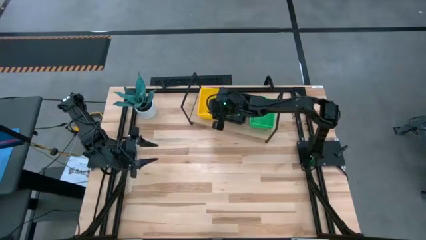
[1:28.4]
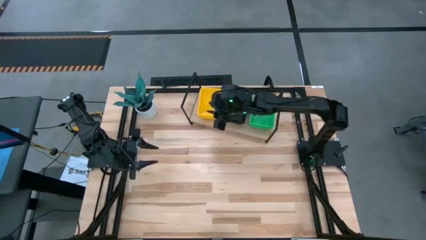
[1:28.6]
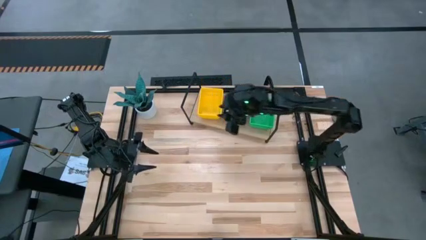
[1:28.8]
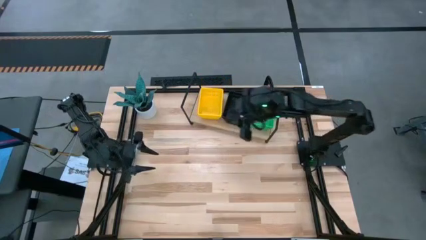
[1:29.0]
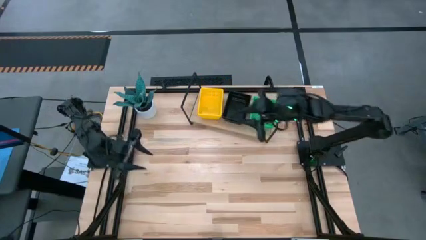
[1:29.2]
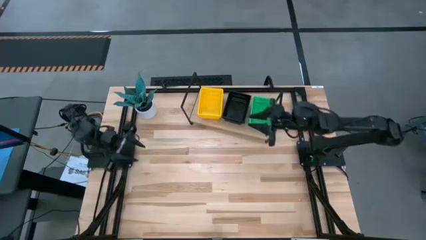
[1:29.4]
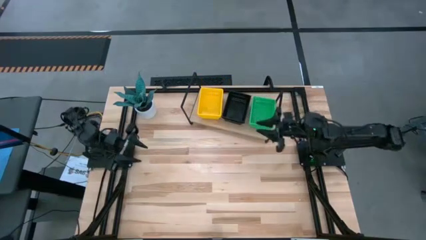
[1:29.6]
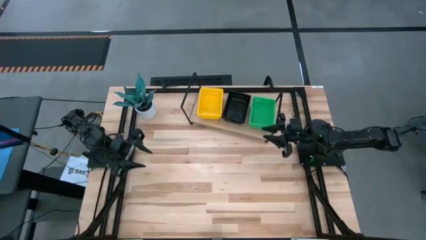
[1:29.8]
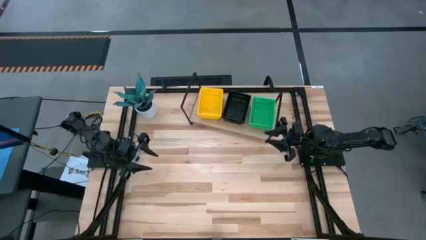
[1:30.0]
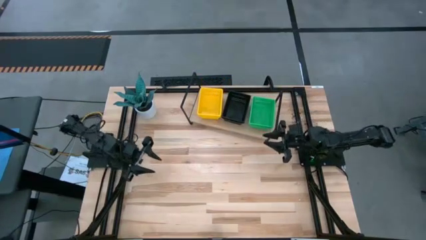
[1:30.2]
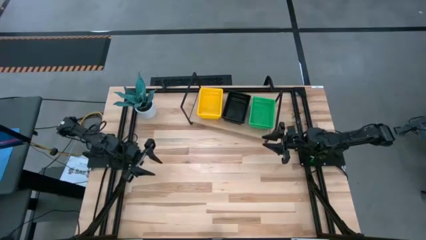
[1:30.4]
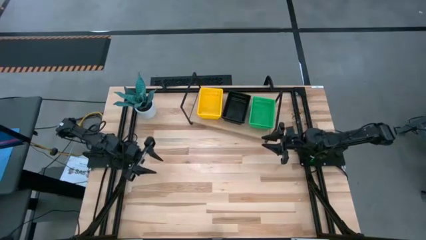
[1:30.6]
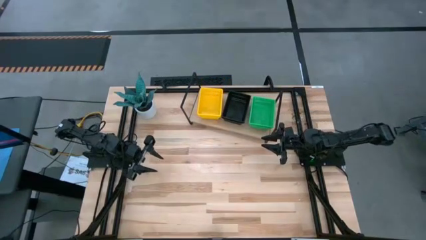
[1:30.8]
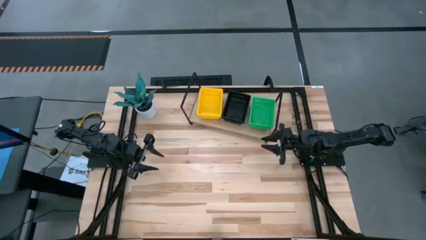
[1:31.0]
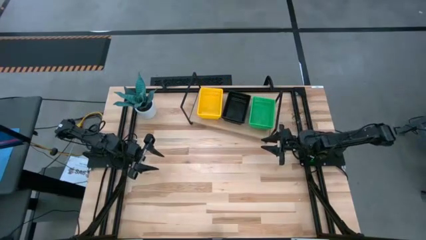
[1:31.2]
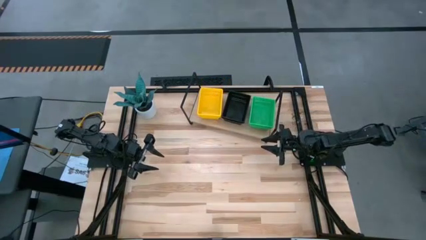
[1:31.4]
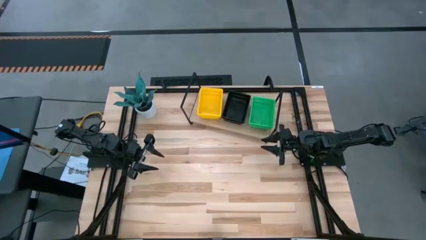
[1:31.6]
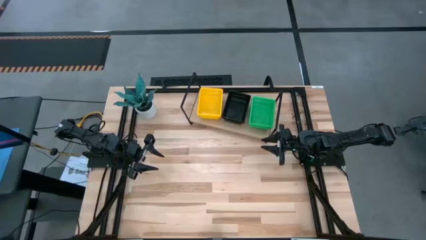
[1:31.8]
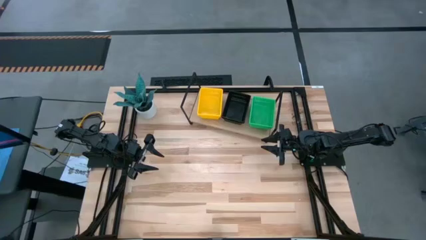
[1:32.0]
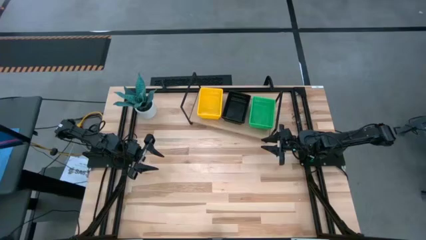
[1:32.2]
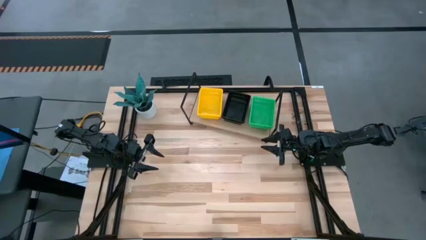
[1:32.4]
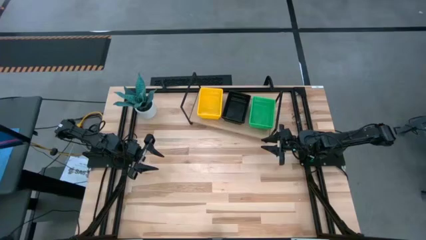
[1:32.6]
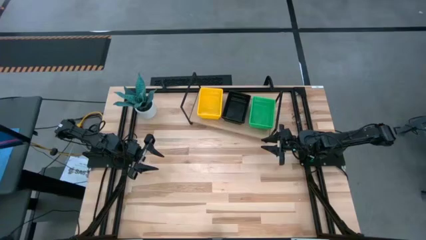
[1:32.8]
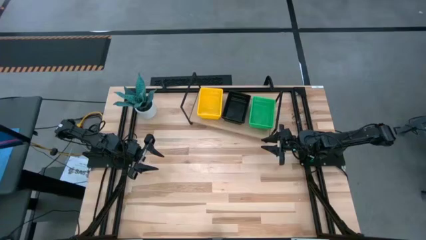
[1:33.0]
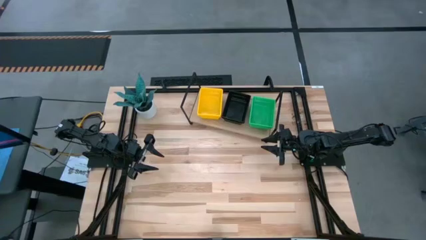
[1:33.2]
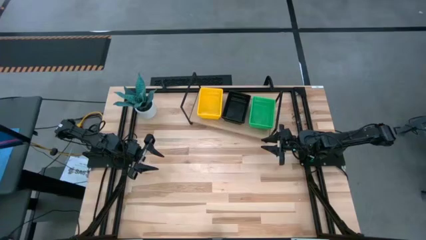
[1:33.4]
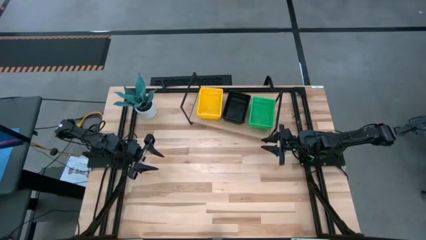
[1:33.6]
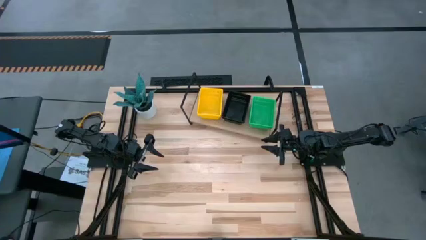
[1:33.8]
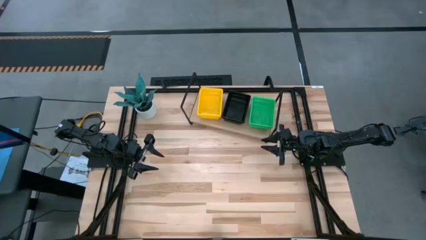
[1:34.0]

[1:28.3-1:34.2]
Task: Stack baskets on shelf by color
Return to Home Position

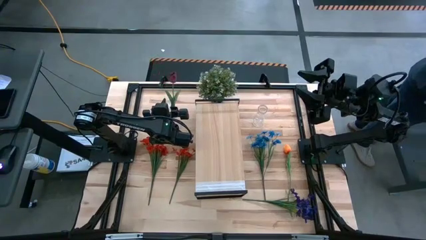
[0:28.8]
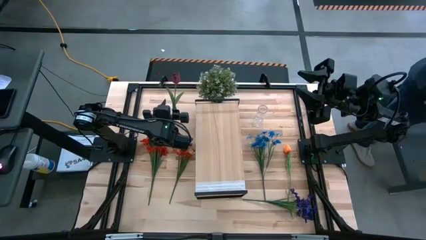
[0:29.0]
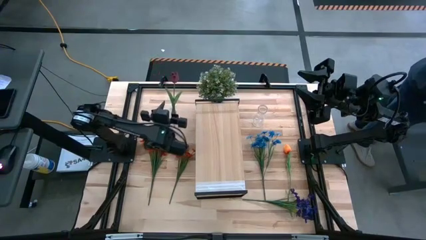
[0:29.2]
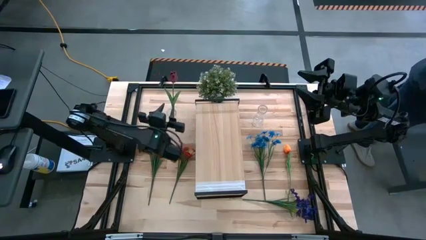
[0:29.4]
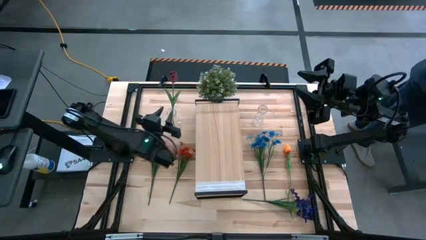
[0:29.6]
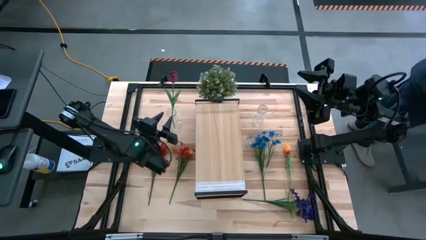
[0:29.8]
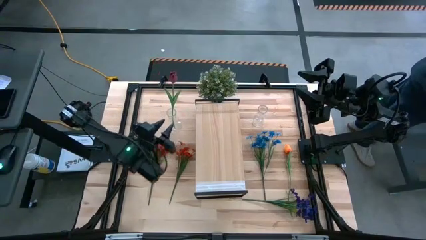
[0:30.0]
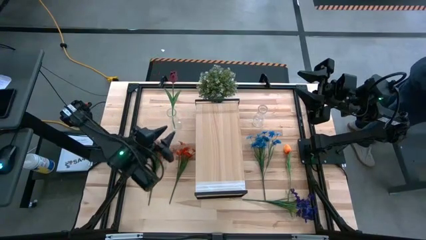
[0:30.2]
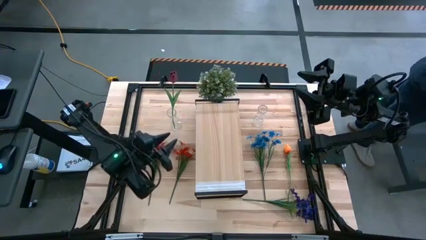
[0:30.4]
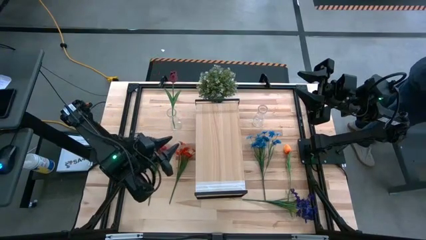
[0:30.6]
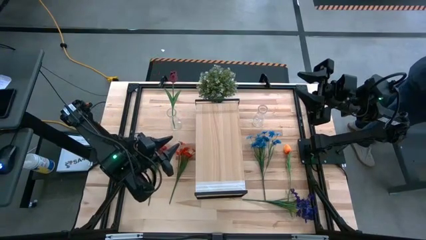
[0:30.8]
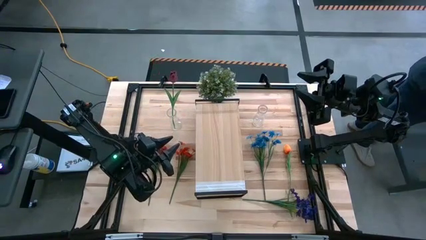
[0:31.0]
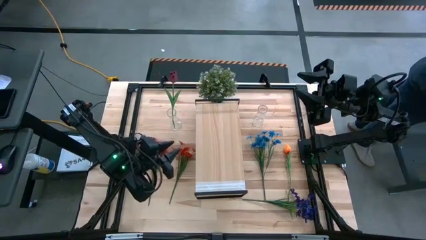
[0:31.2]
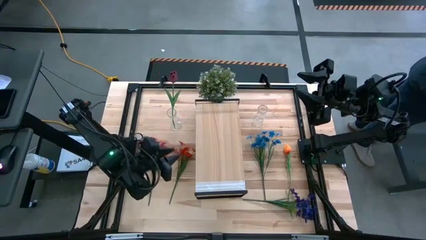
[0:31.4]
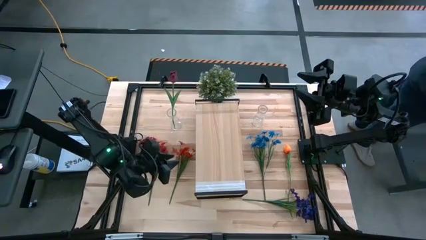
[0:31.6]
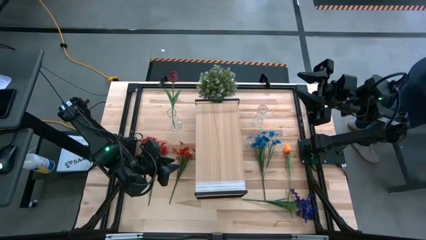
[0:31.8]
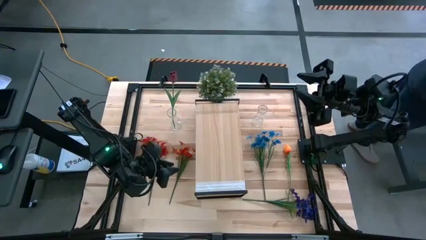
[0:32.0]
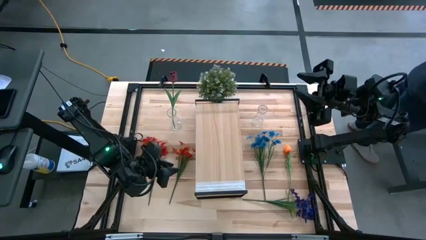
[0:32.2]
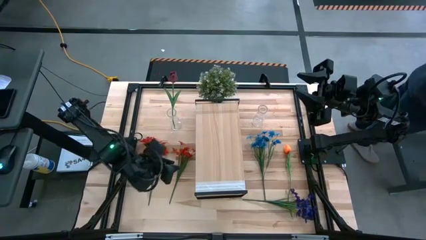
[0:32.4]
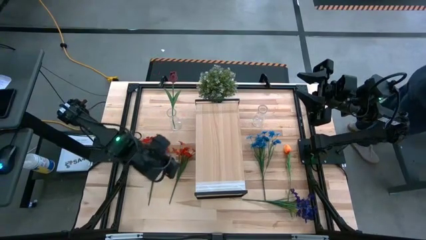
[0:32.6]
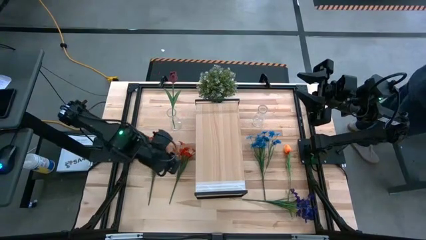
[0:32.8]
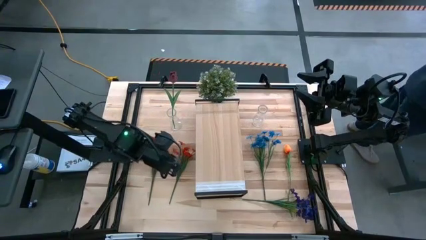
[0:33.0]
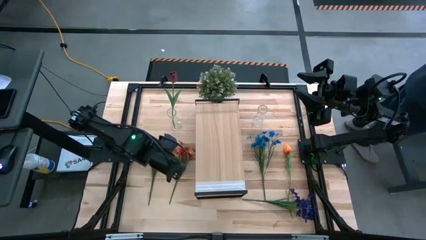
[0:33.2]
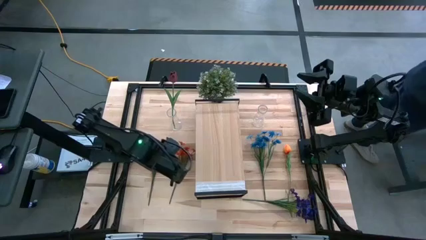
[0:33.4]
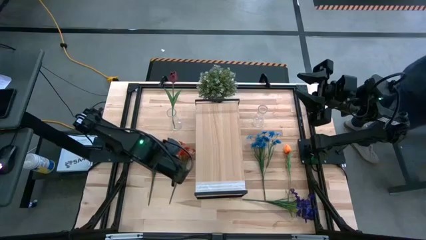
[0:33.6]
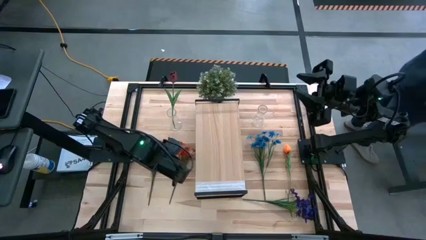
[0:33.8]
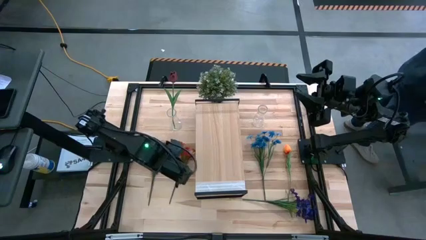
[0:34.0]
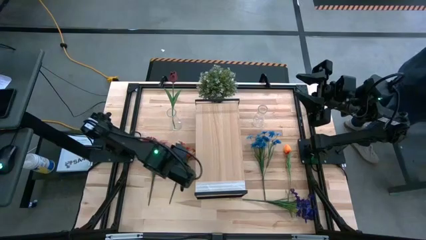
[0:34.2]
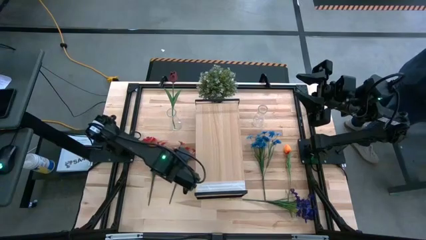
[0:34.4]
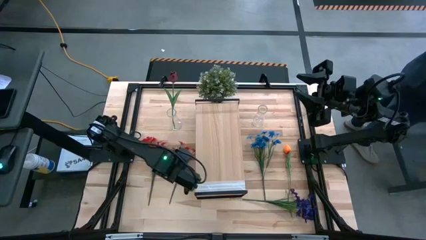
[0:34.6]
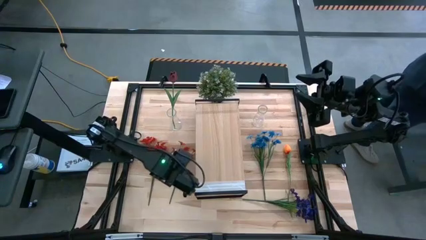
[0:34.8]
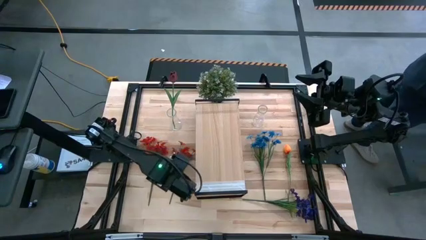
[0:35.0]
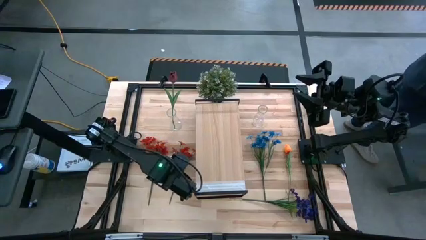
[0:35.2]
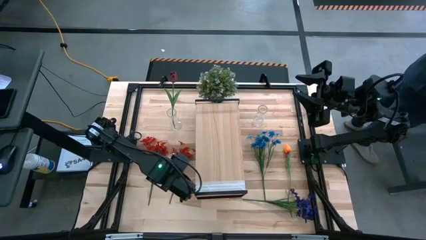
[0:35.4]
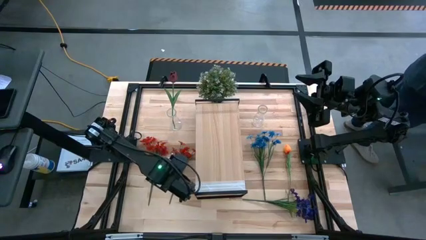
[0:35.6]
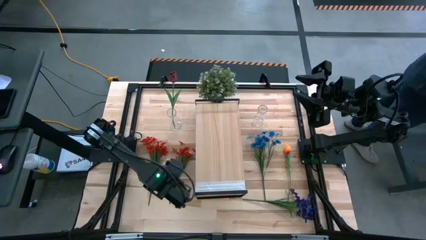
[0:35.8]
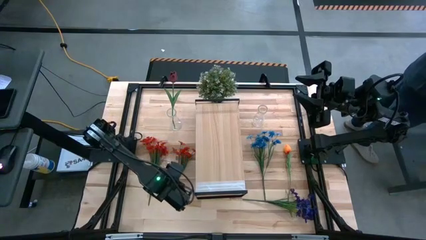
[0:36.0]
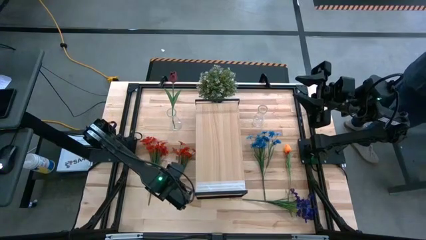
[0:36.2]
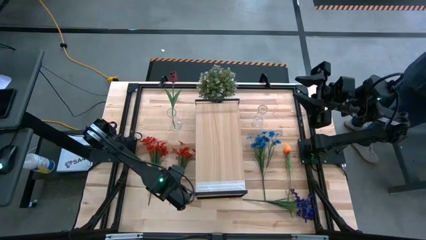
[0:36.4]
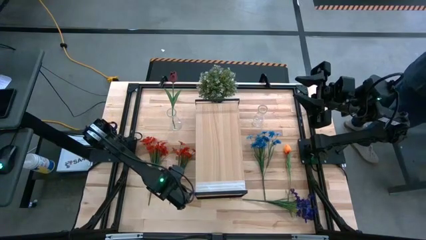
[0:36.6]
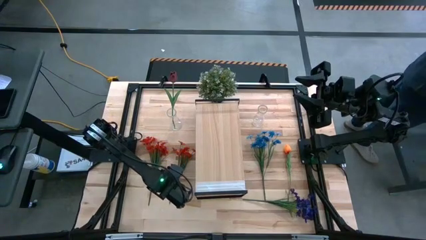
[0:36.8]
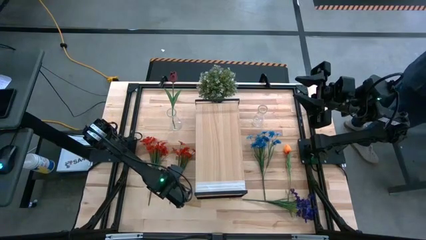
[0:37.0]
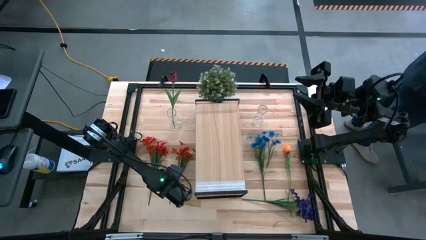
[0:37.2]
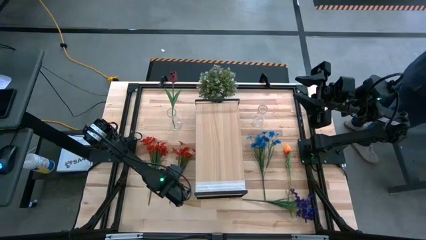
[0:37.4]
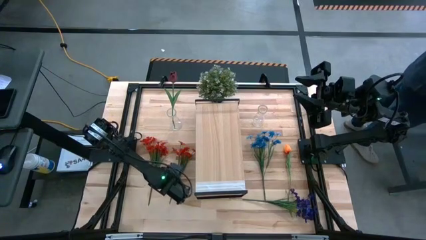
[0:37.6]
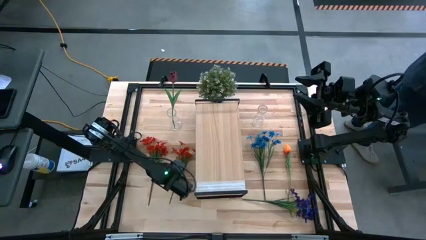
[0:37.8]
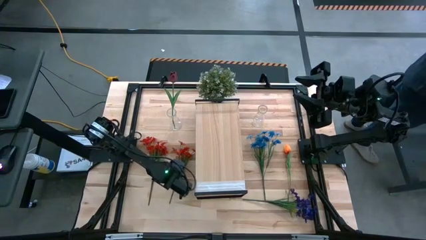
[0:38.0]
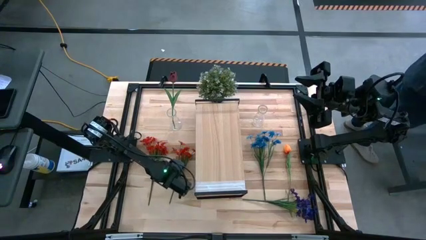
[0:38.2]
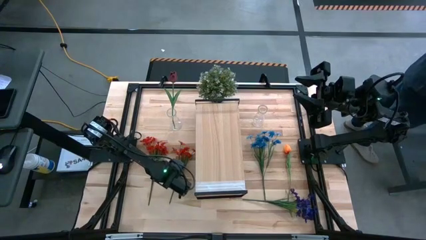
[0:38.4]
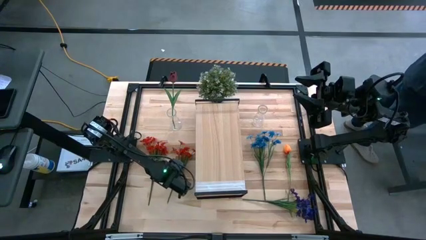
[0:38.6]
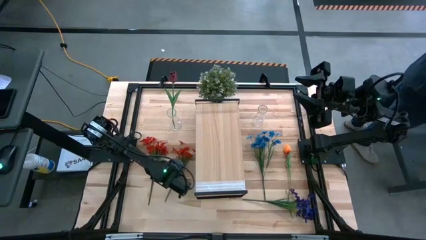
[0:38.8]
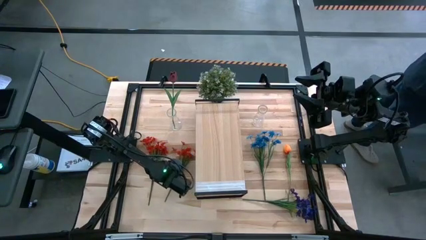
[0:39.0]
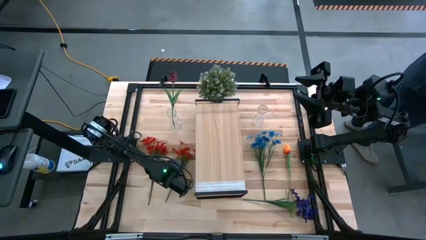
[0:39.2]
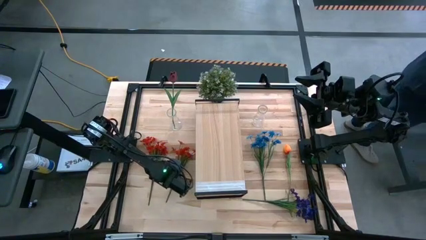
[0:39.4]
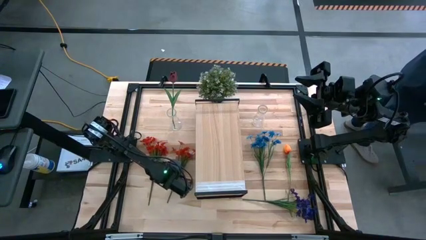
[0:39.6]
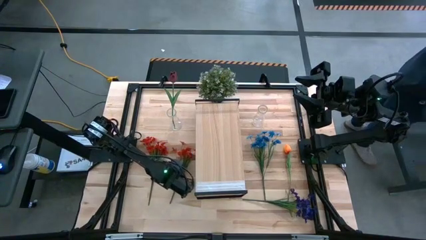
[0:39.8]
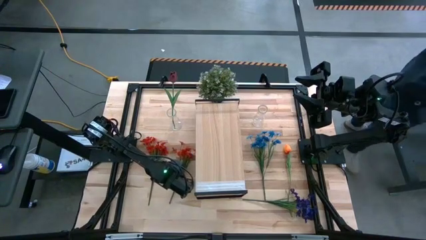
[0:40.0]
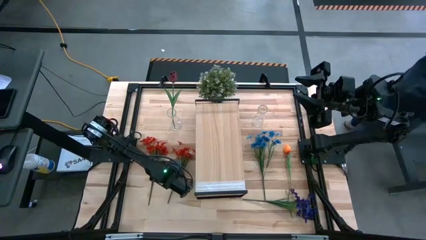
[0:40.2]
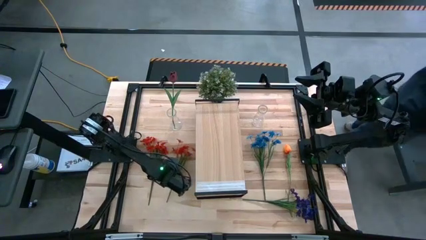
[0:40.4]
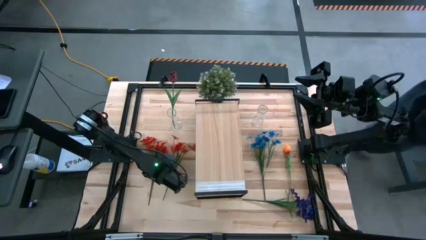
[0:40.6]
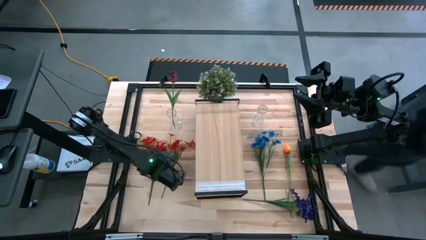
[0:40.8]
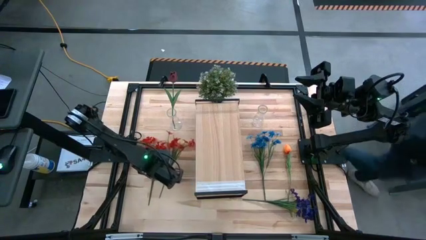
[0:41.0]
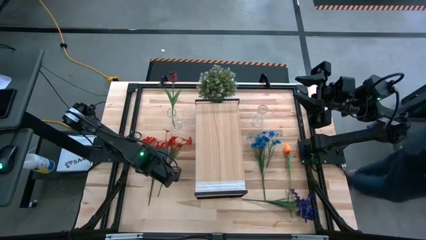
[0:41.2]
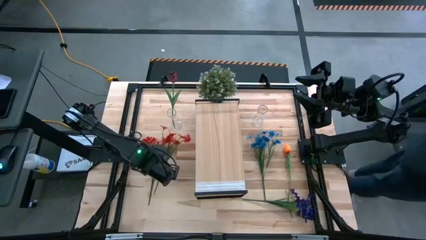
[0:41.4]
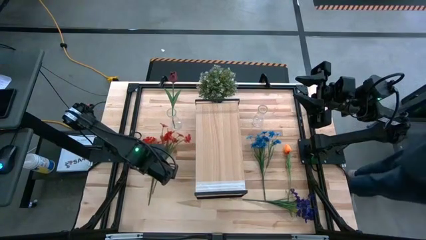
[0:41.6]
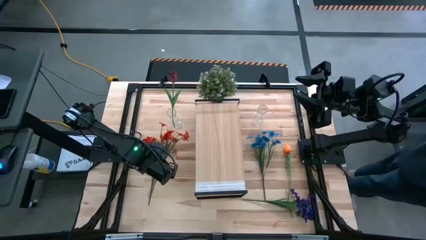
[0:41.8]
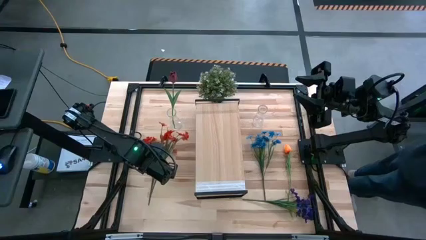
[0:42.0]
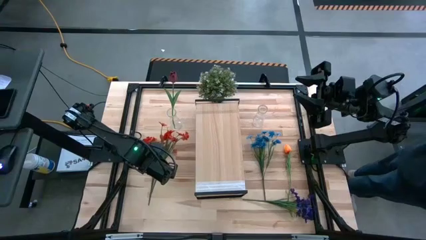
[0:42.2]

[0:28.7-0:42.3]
Task: Pick and place flowers into a vace then onto a shelf
Put the right orange flowers into the left transparent vase
